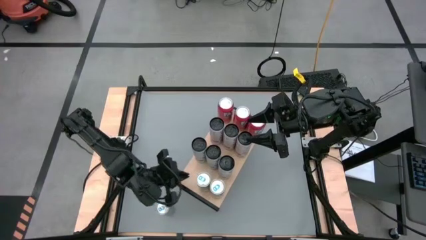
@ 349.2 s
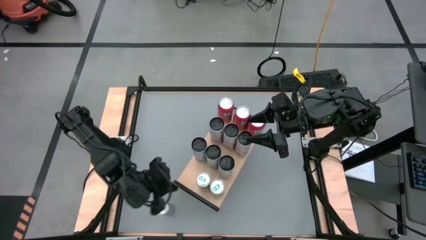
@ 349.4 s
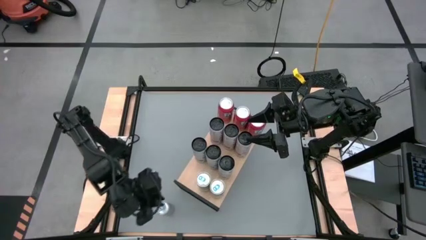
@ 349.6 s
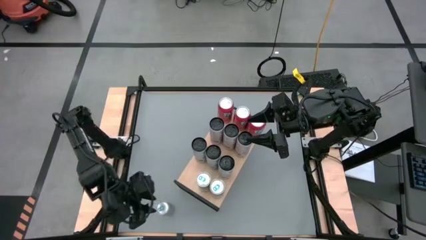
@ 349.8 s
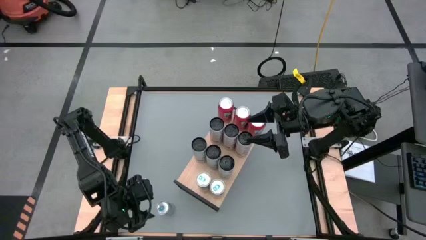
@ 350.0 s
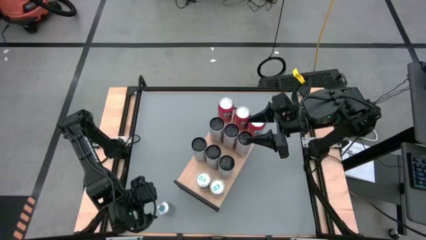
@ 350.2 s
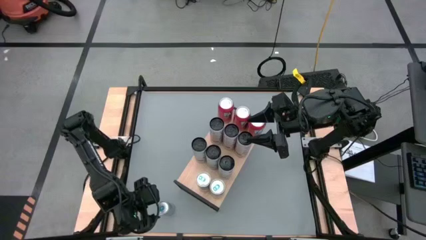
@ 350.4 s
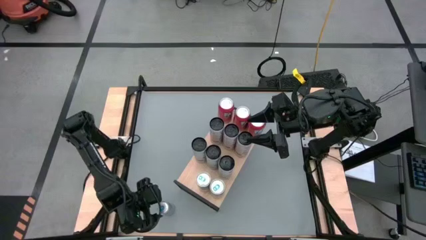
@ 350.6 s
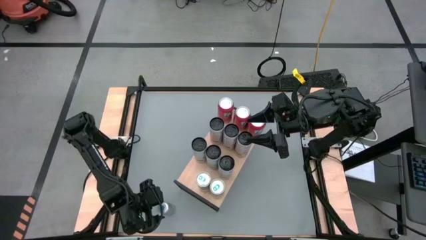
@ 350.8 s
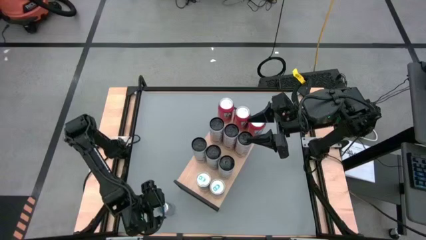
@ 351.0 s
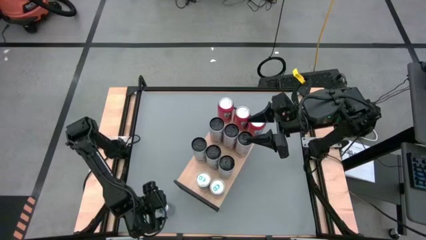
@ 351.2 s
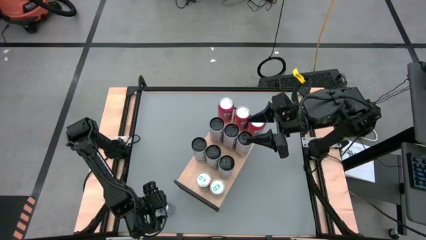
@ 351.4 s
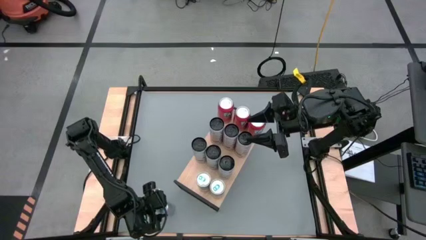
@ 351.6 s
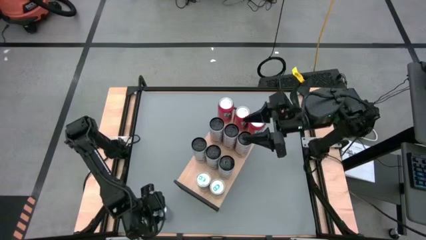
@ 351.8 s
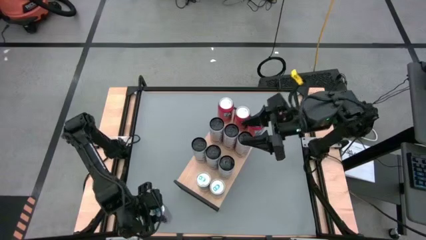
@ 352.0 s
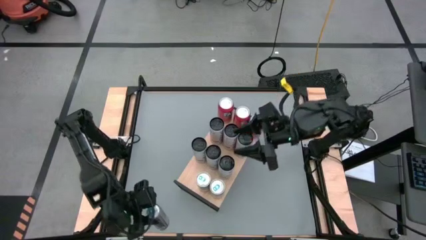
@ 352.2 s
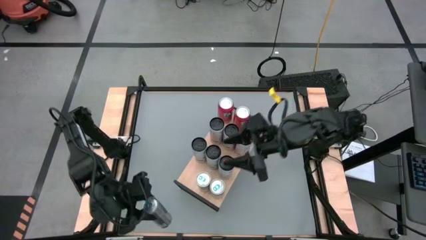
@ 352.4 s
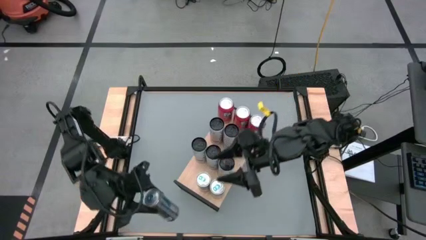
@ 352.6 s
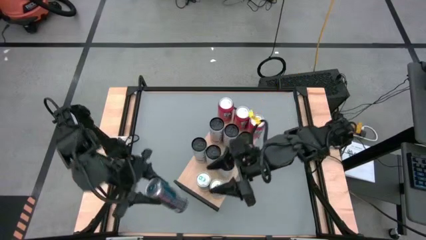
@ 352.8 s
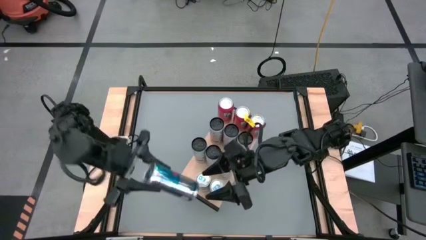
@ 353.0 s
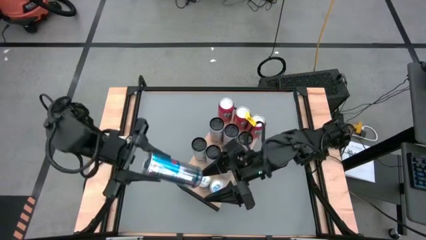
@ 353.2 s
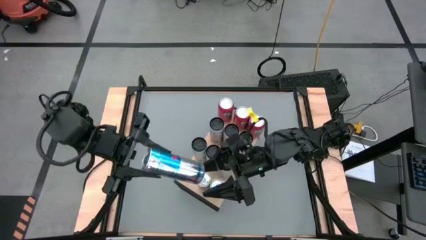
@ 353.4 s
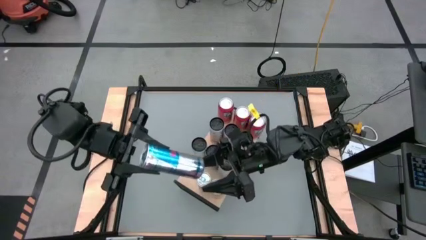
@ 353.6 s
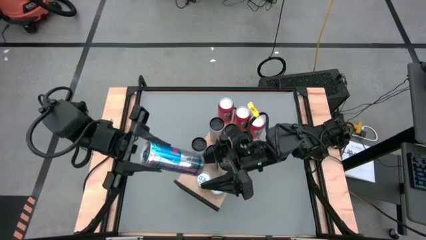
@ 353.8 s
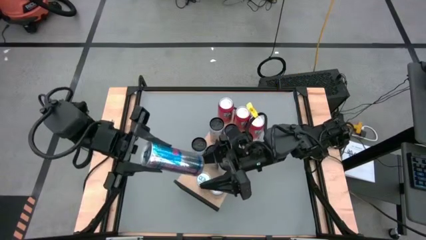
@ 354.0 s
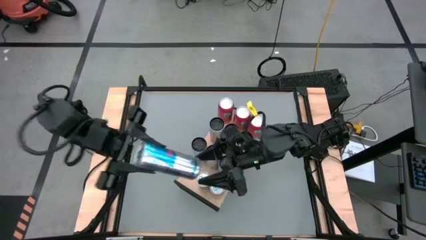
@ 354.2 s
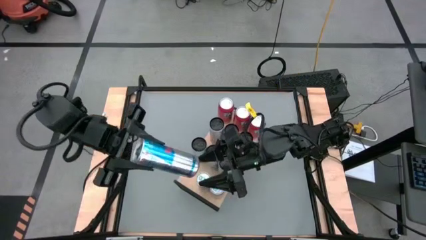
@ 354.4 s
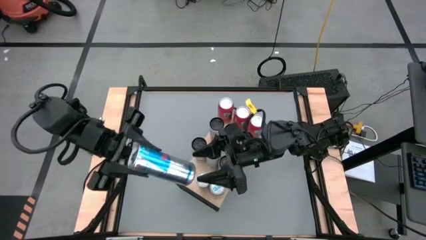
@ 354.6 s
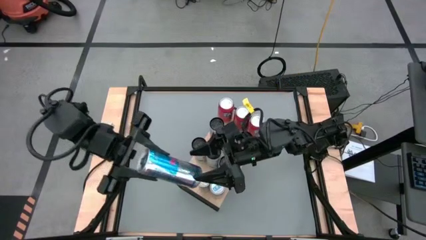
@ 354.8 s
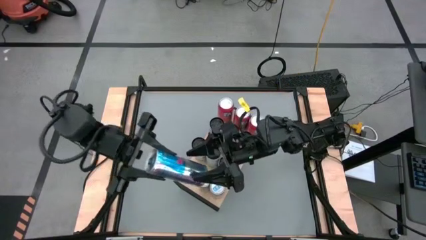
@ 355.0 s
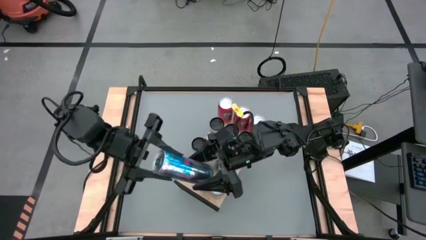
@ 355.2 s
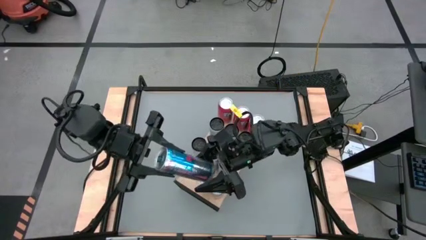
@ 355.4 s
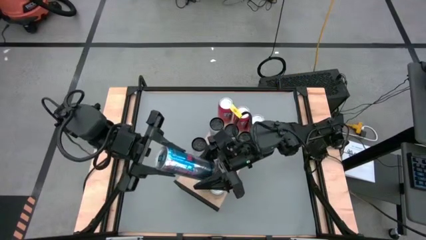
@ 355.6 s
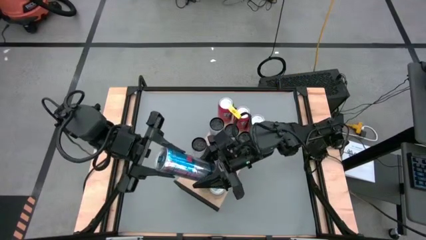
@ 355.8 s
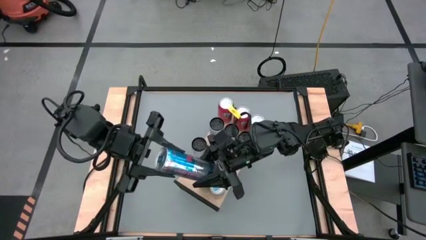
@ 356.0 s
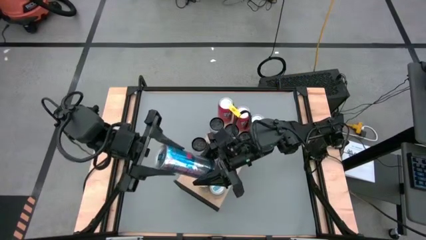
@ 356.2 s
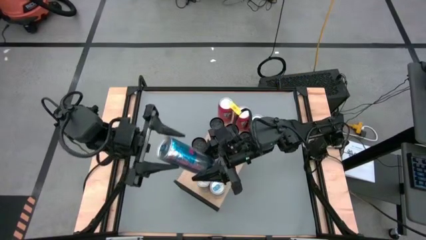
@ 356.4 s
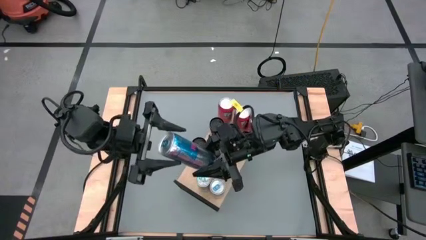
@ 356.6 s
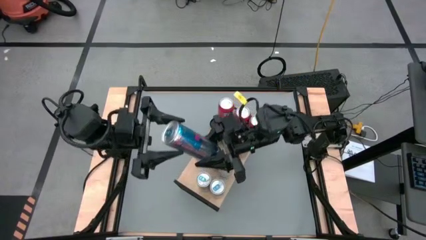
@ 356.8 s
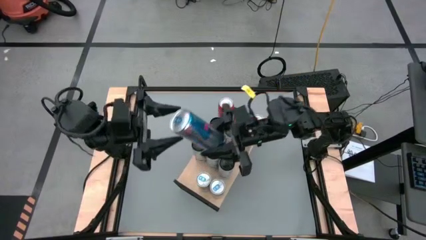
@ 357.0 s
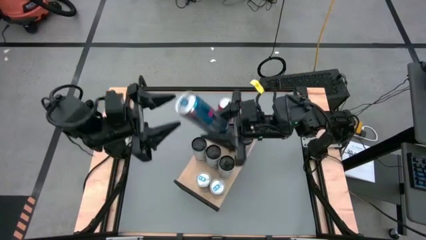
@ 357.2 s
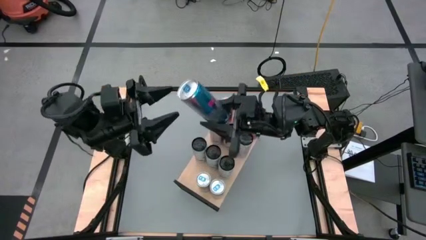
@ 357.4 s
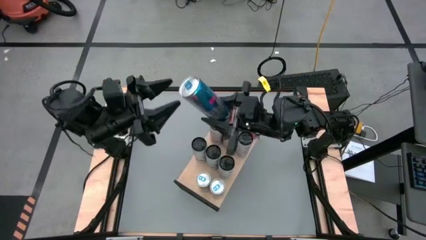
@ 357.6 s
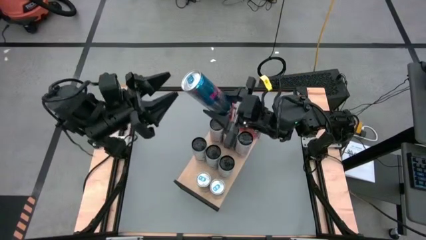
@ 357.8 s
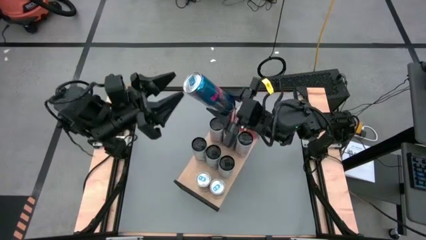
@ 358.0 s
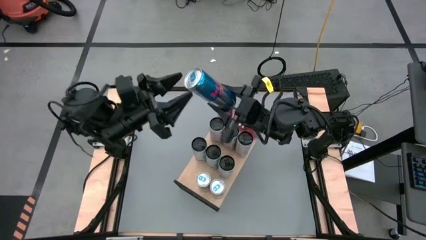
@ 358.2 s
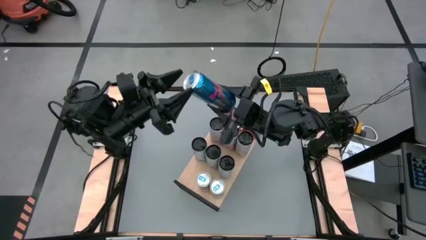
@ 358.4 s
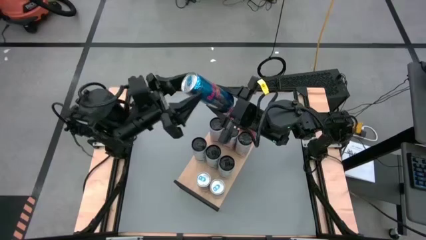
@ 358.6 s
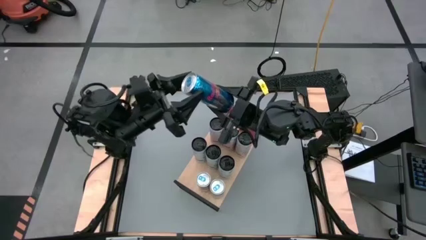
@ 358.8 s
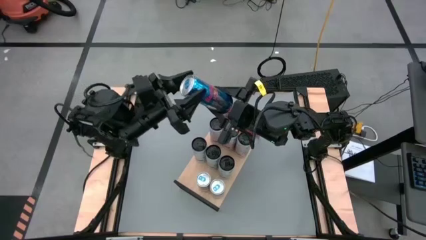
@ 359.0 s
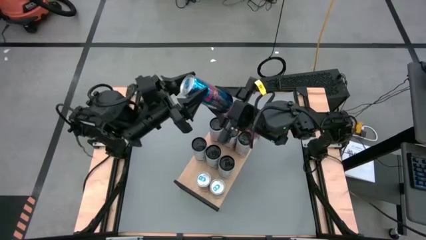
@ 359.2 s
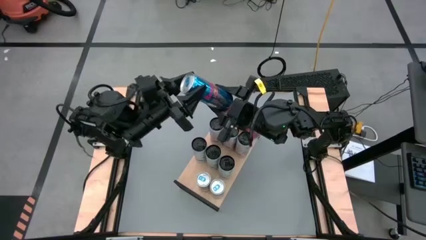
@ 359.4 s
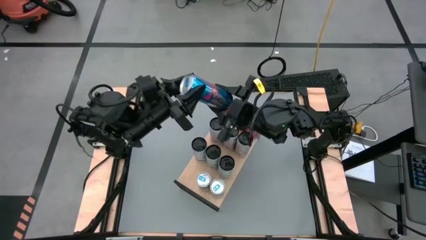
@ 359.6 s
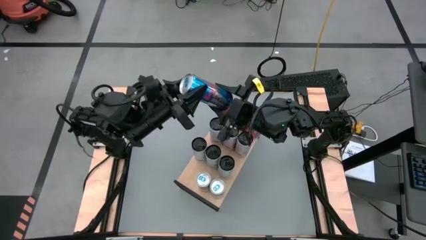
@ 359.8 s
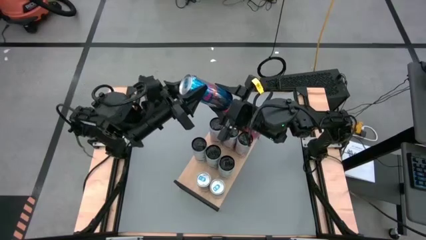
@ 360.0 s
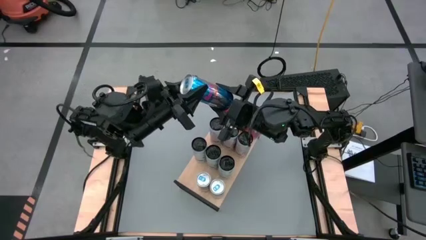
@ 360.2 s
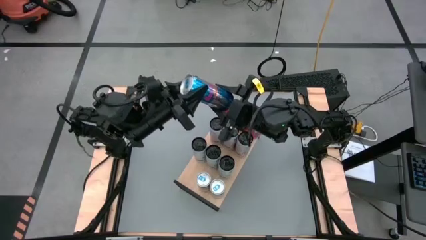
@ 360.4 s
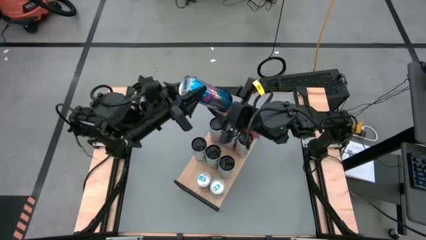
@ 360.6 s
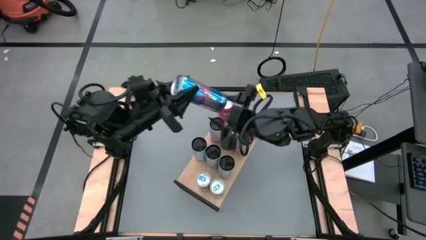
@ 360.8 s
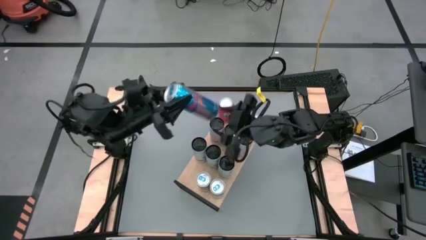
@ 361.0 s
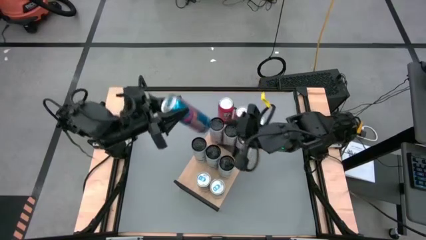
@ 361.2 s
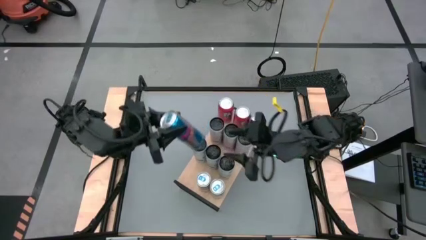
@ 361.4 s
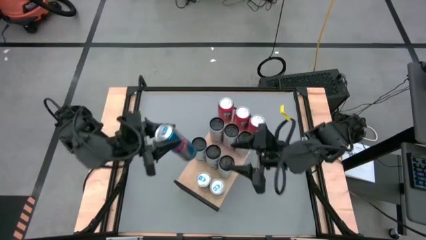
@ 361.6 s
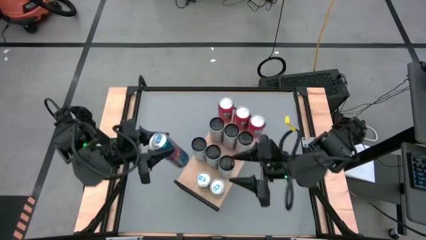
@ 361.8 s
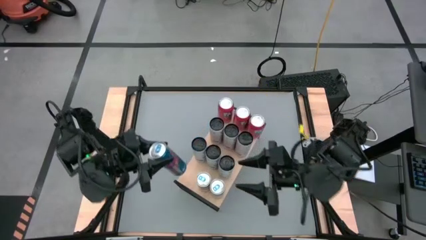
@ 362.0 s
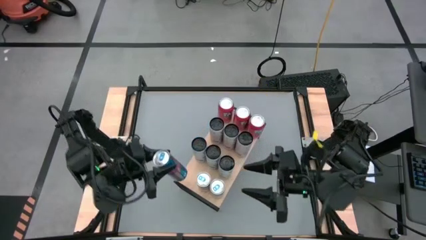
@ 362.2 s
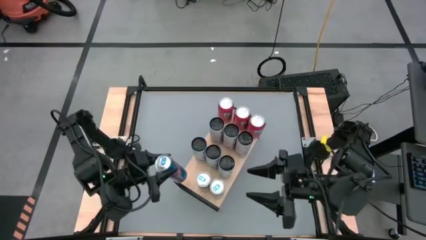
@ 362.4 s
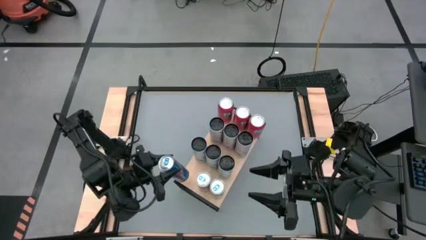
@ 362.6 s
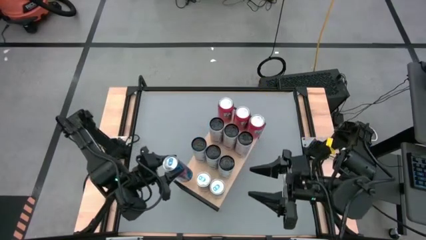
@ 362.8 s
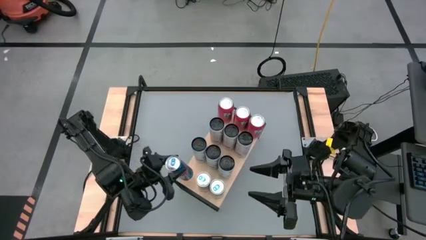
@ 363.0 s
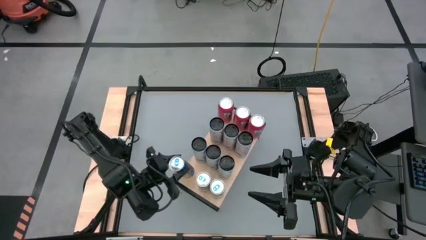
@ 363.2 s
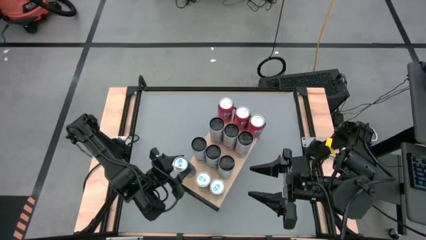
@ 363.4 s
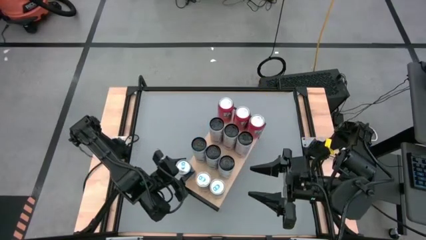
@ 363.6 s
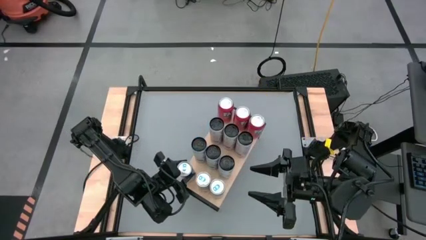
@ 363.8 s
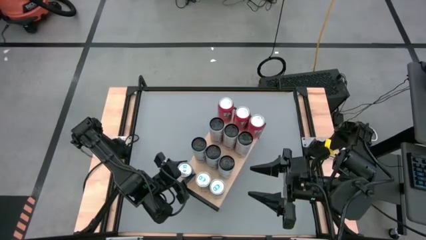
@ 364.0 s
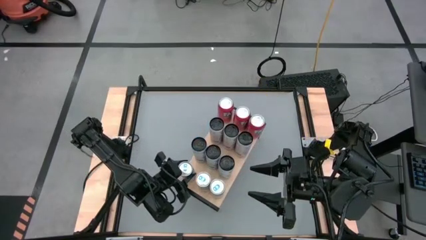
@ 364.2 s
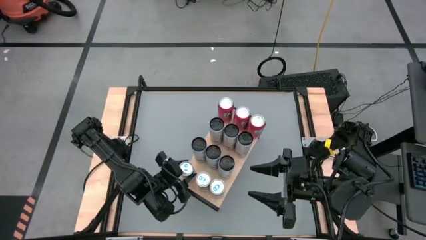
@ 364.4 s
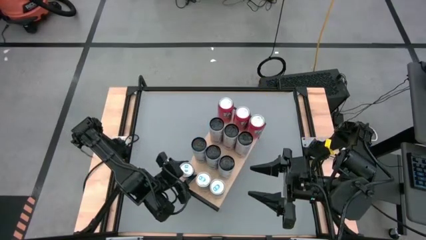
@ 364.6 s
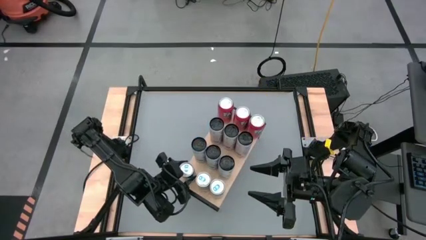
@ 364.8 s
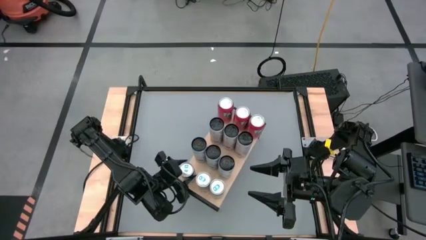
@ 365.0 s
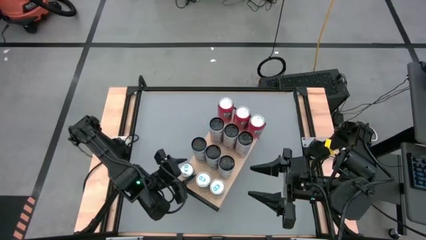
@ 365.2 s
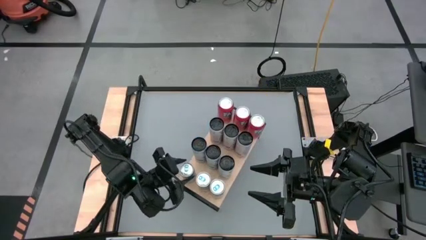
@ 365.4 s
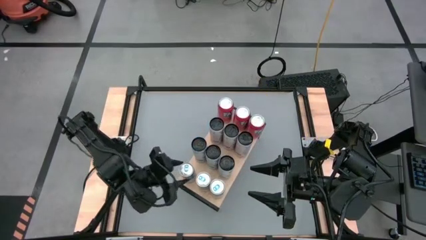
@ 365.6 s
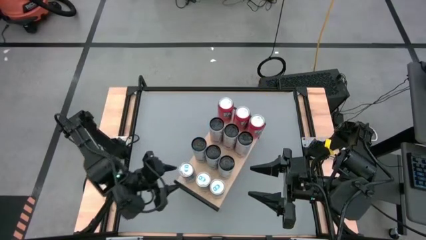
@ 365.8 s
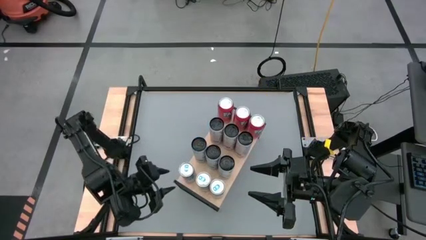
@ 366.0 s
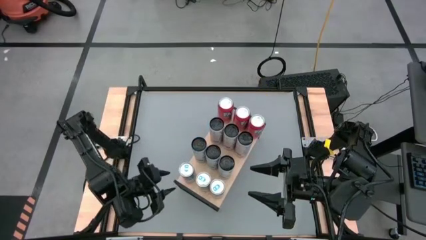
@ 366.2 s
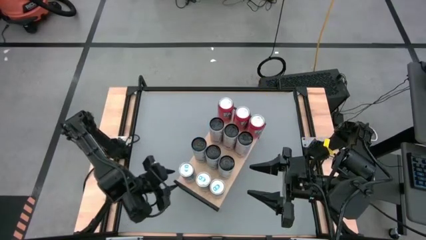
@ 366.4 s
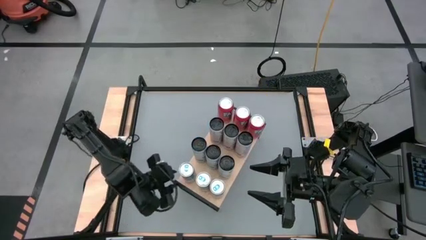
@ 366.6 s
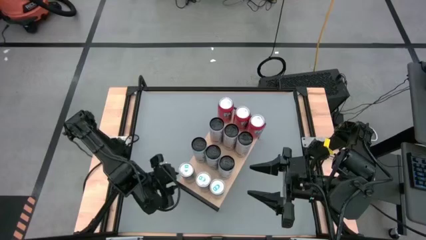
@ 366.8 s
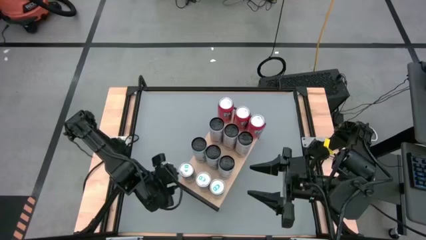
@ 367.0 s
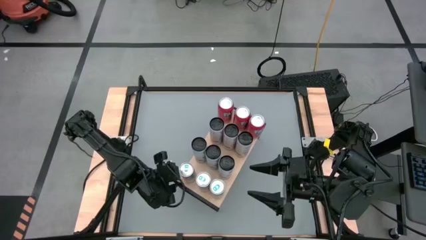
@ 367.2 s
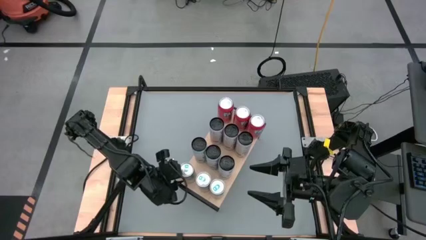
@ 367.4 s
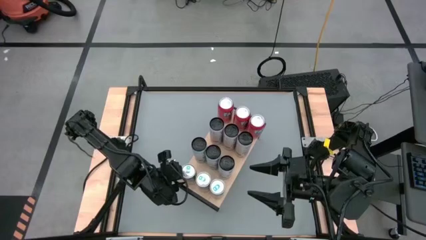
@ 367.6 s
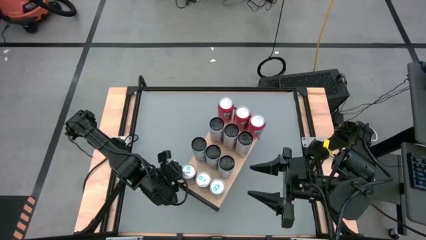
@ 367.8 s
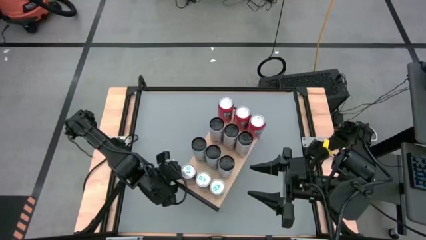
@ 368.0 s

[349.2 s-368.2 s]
Task: Place canned beverage on shelf
Put the blue soda can on the shelf aligned with the other blue soda cans
